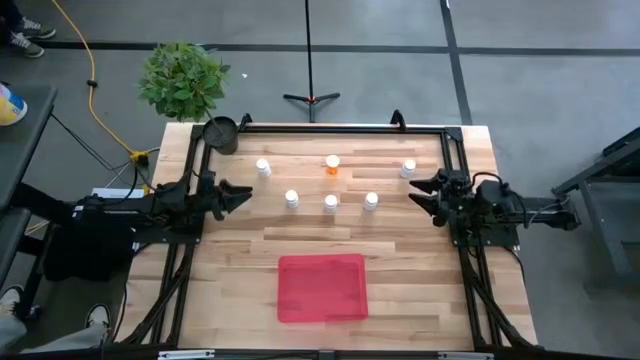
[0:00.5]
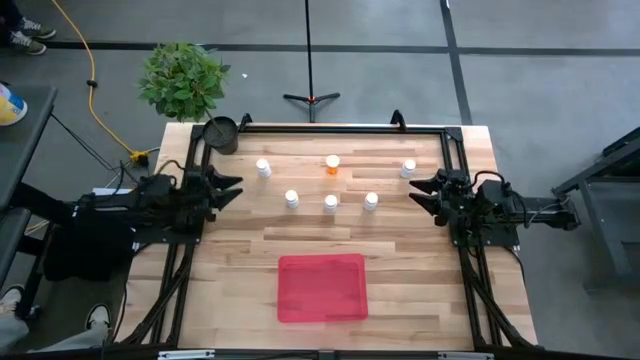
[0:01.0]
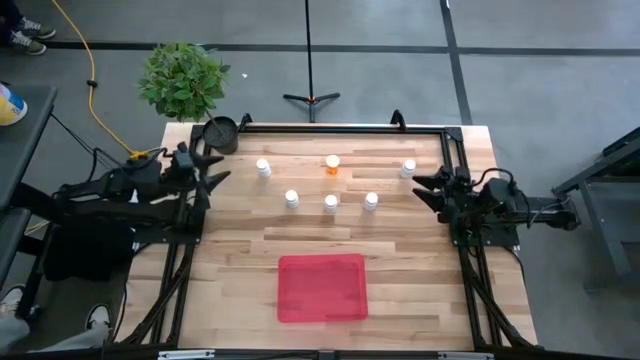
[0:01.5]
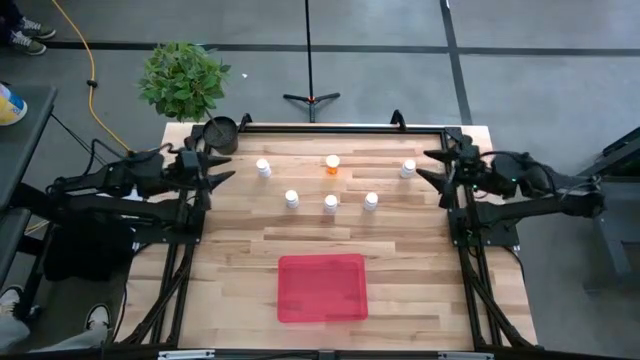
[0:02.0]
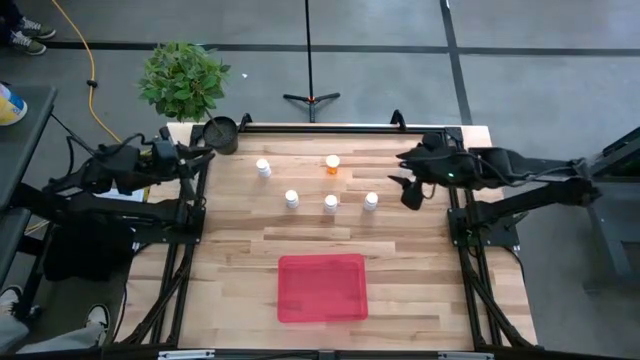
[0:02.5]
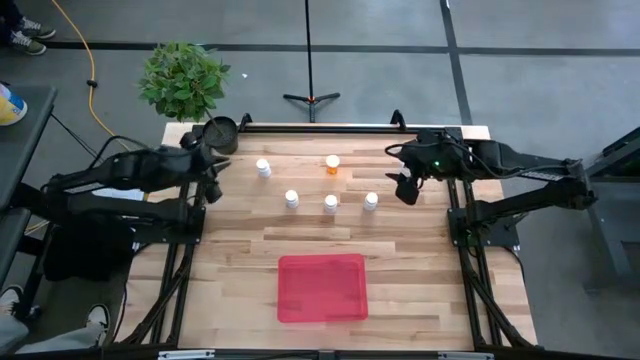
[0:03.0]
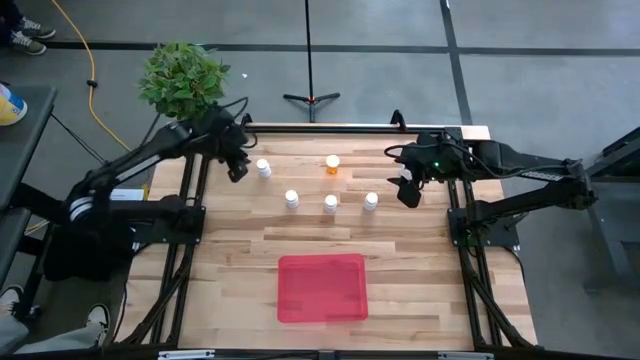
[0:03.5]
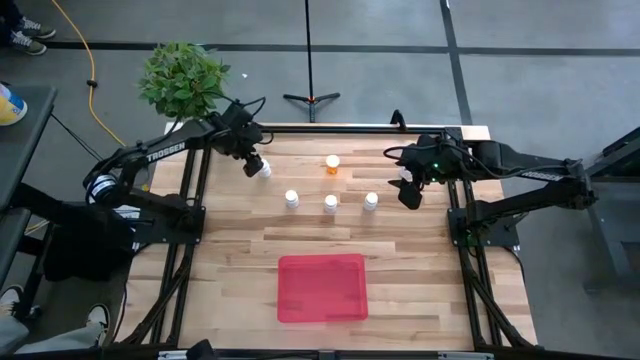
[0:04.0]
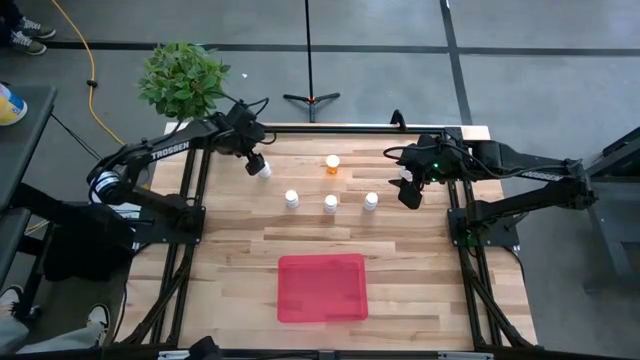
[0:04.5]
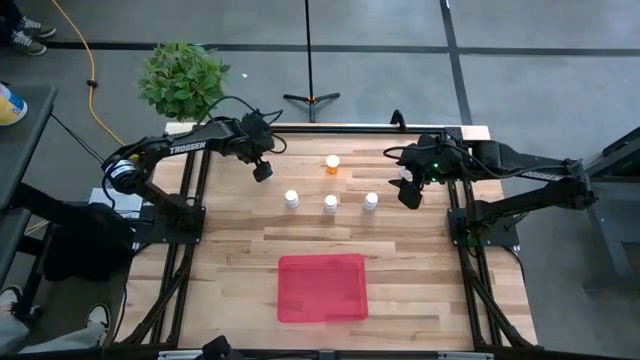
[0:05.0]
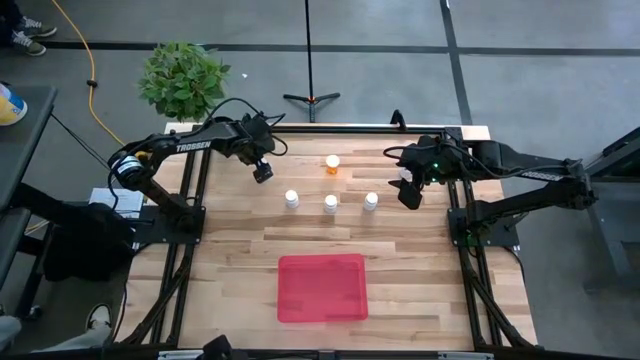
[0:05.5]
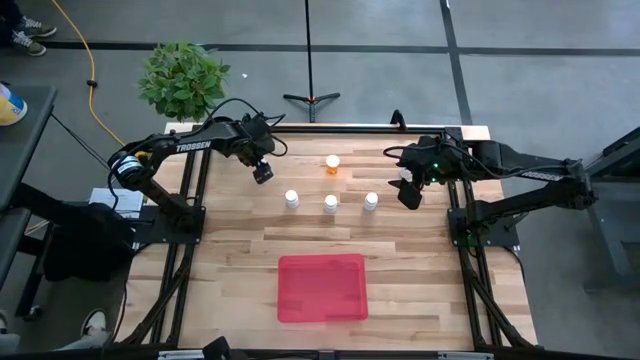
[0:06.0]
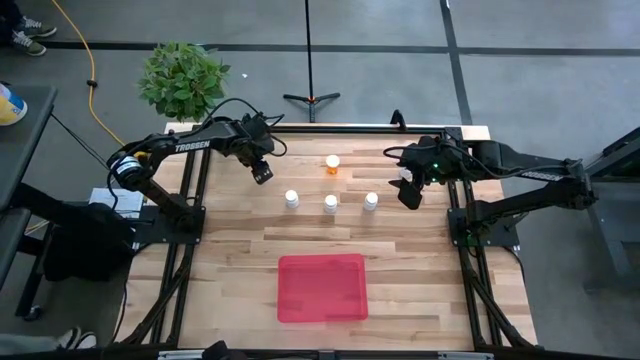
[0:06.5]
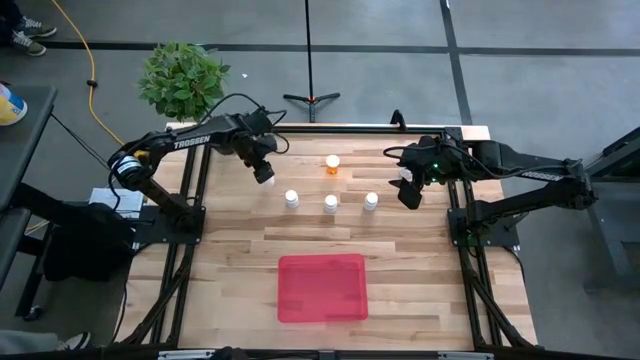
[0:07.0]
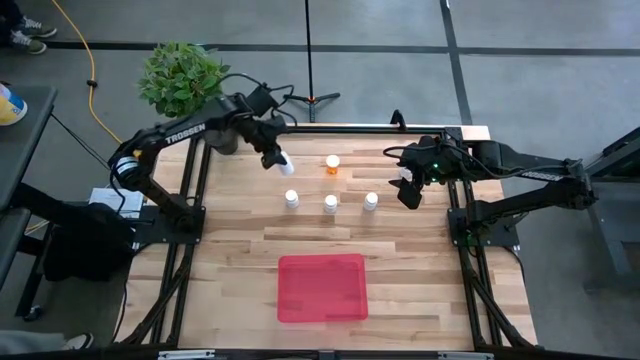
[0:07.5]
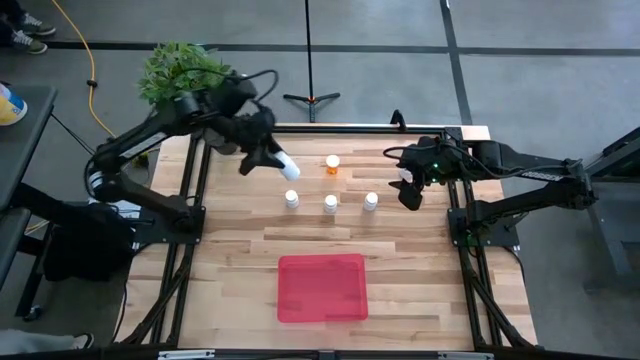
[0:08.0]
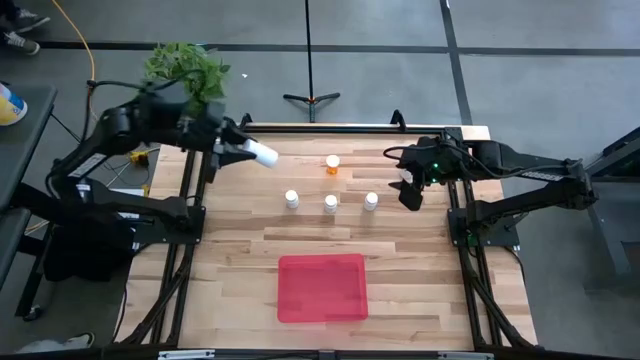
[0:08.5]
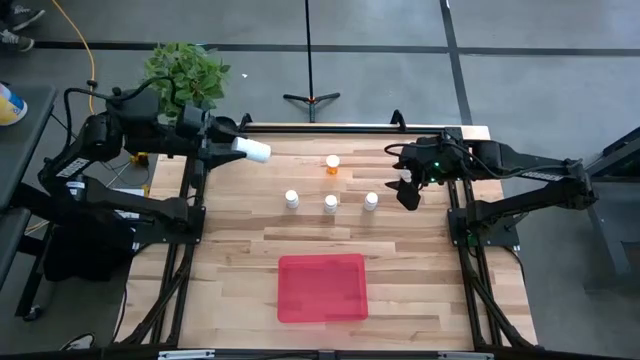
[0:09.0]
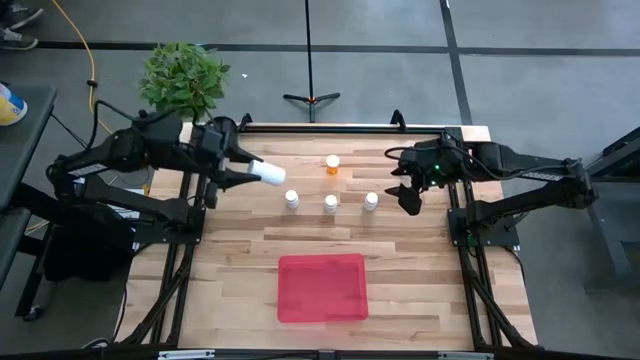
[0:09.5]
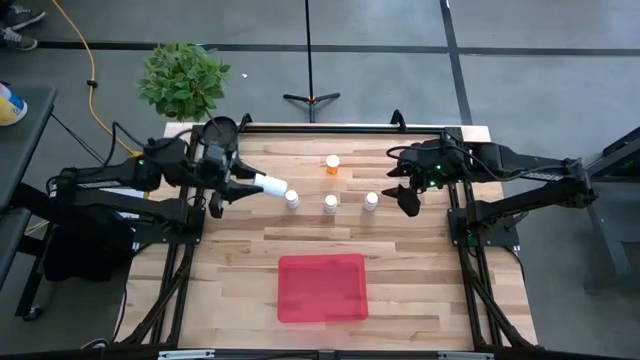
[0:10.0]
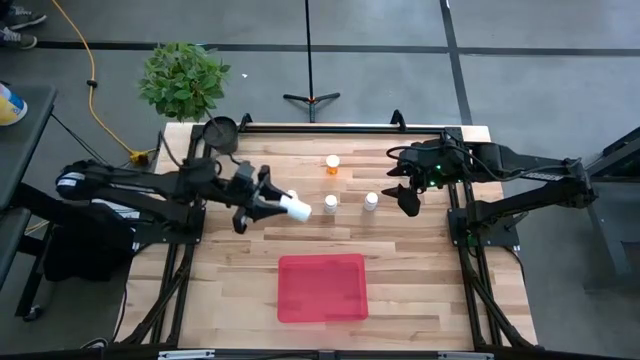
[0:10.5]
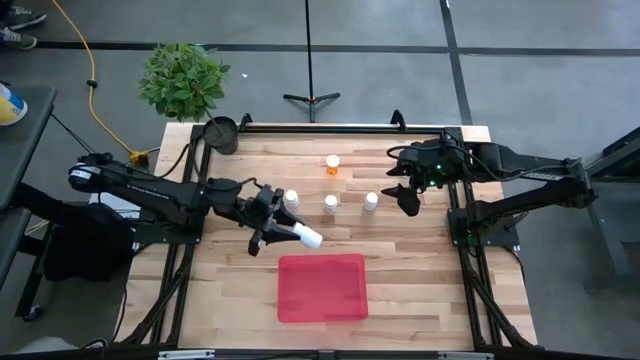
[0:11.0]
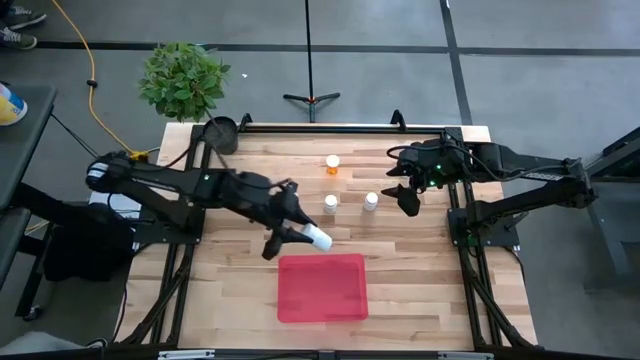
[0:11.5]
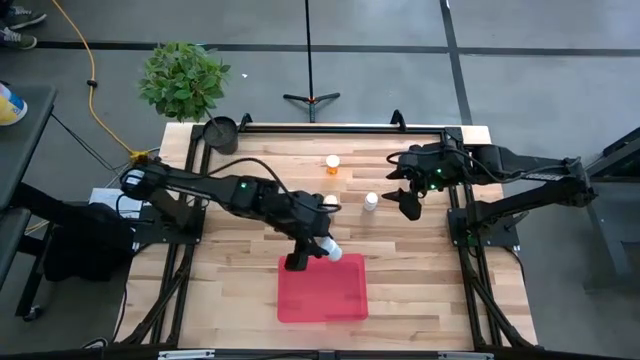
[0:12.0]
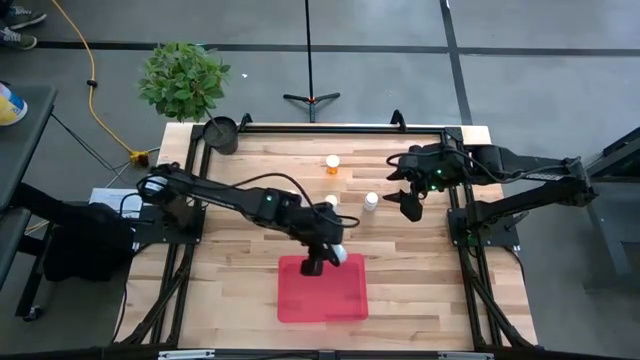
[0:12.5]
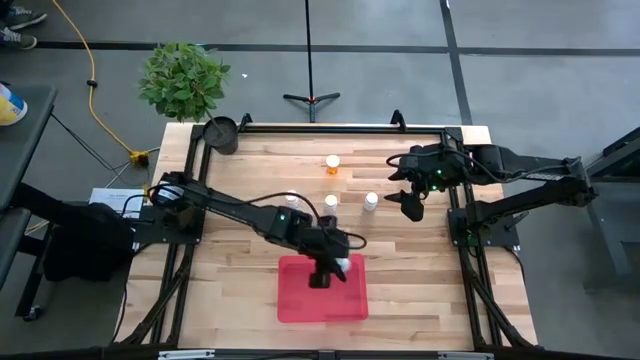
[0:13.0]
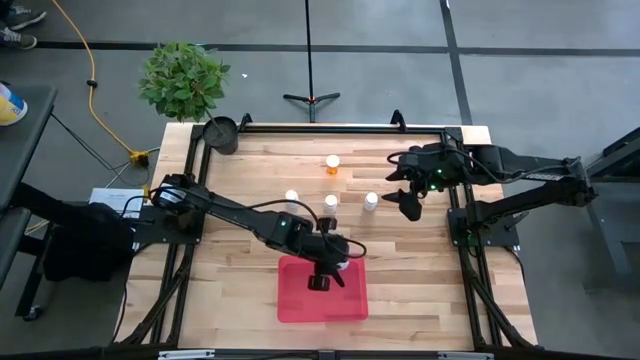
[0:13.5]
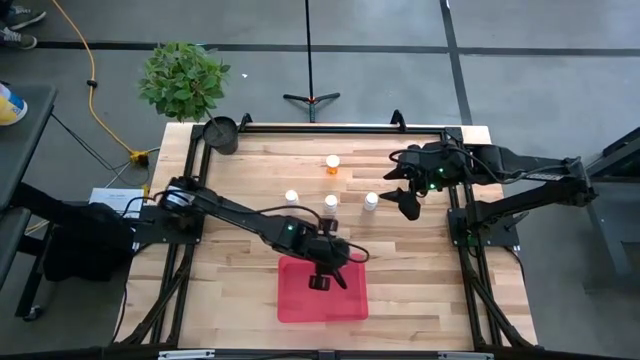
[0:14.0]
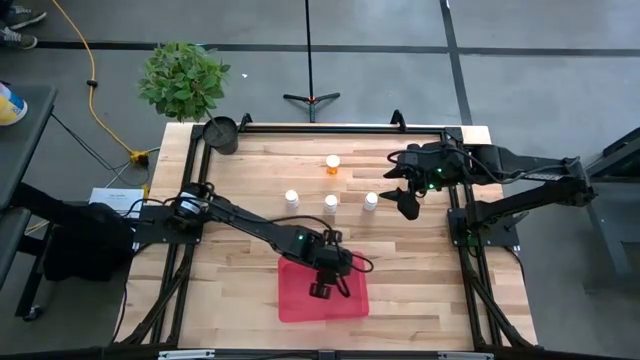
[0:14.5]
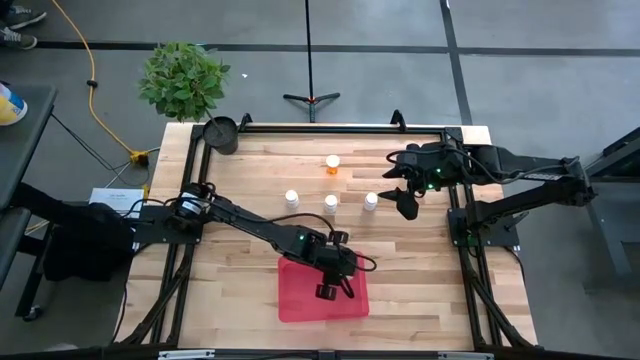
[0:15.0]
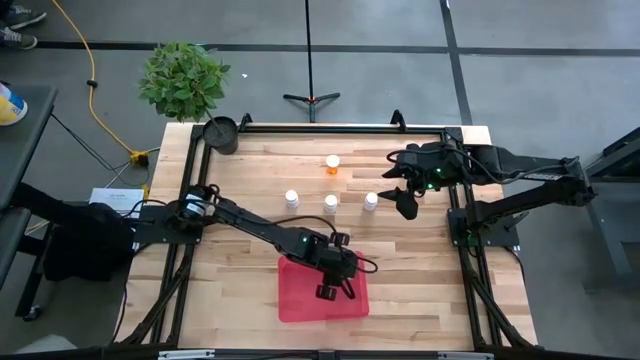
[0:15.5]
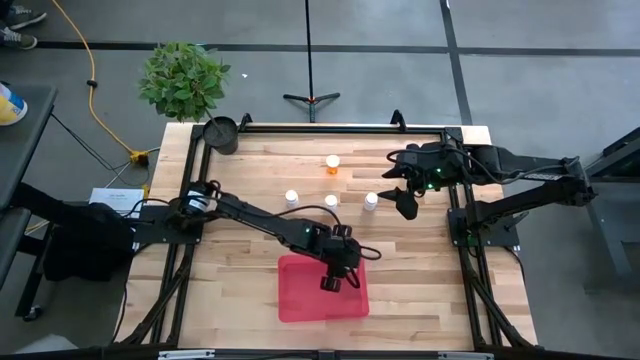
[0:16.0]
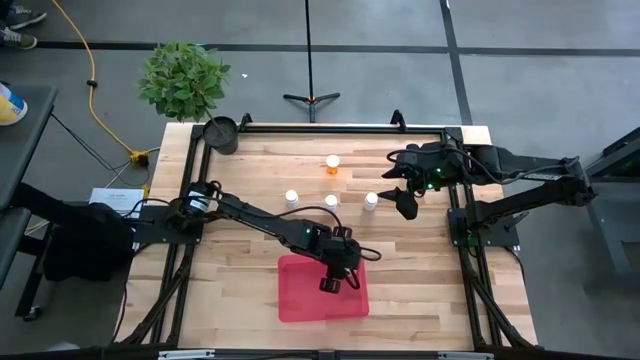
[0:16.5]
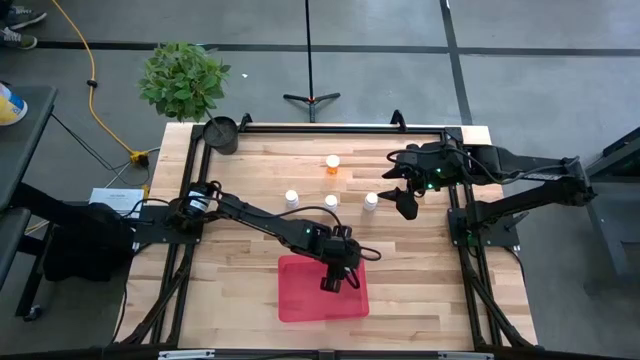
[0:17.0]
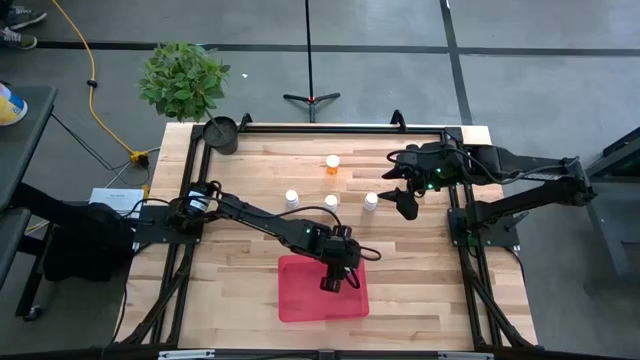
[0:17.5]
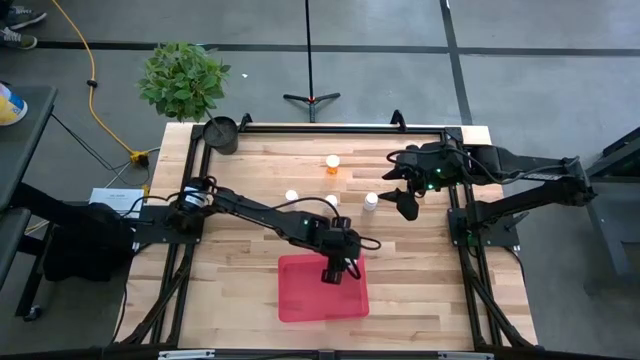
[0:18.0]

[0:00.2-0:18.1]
Task: Pick and place pill bottles into a basket
Put the white medicine bottle into the red container
